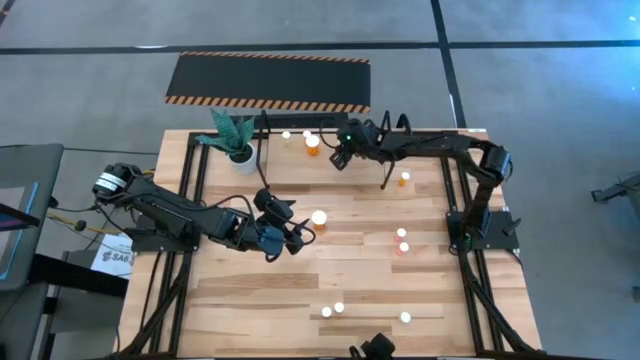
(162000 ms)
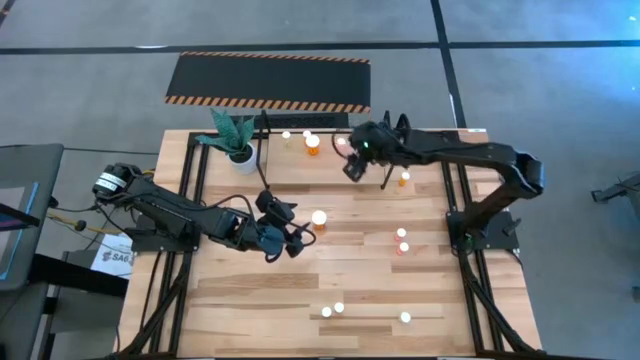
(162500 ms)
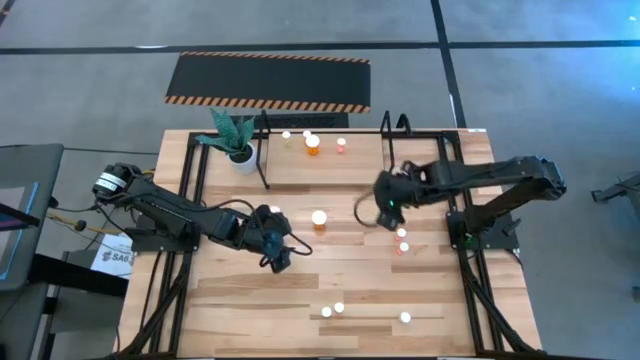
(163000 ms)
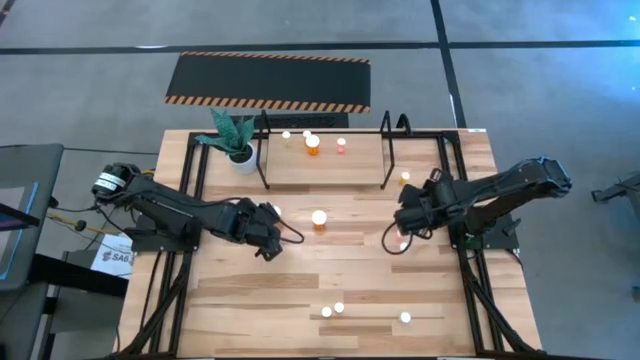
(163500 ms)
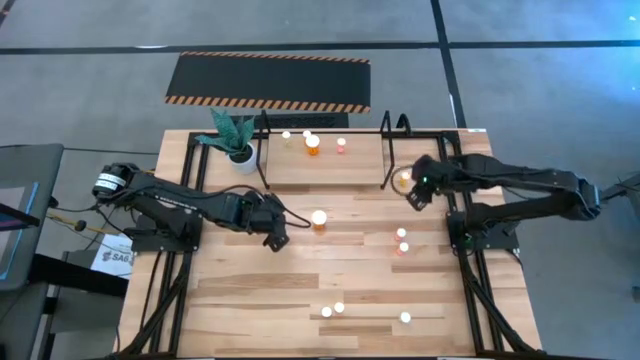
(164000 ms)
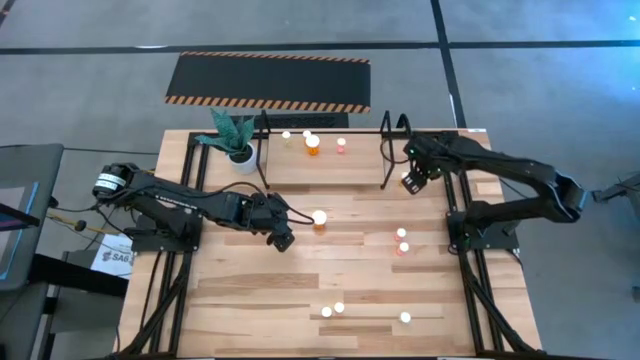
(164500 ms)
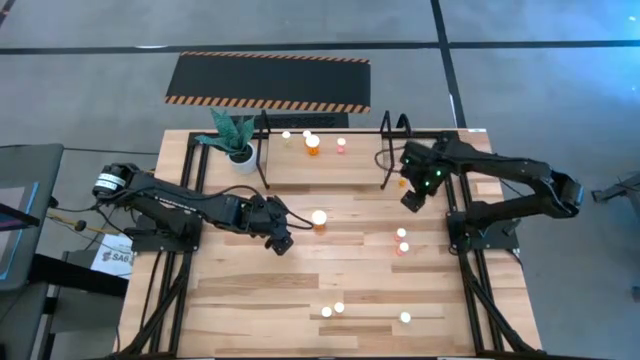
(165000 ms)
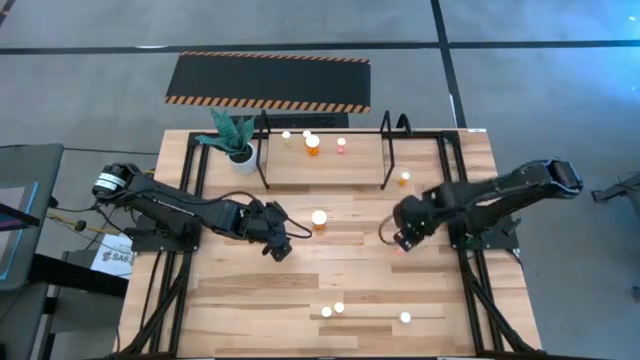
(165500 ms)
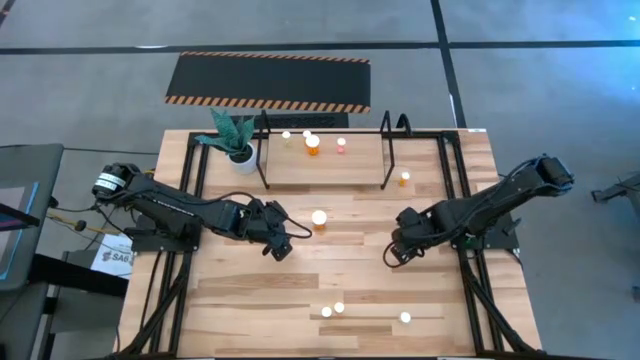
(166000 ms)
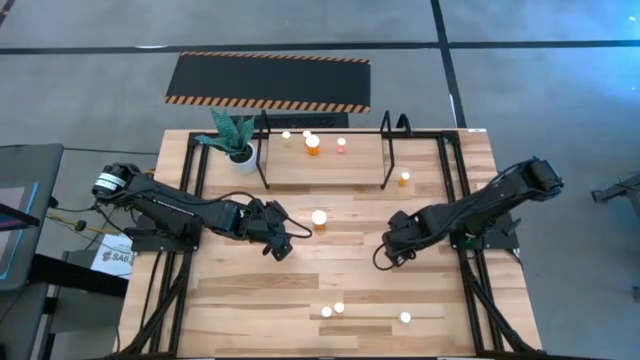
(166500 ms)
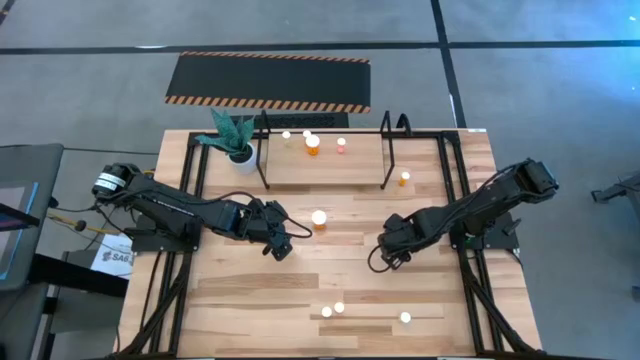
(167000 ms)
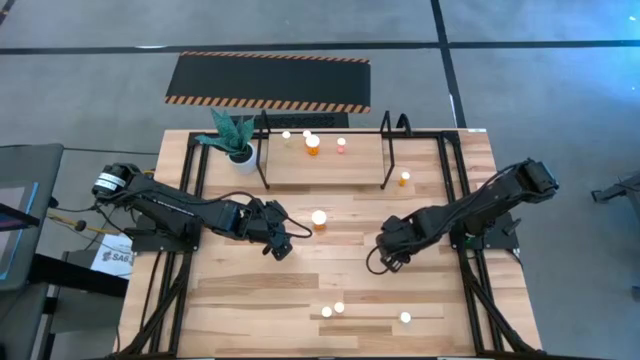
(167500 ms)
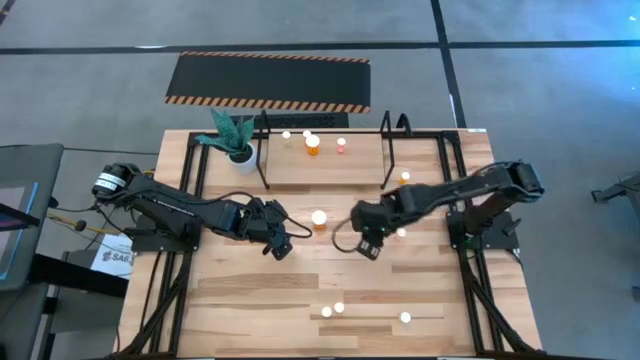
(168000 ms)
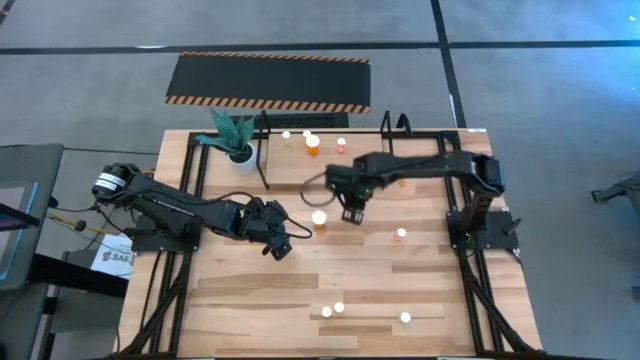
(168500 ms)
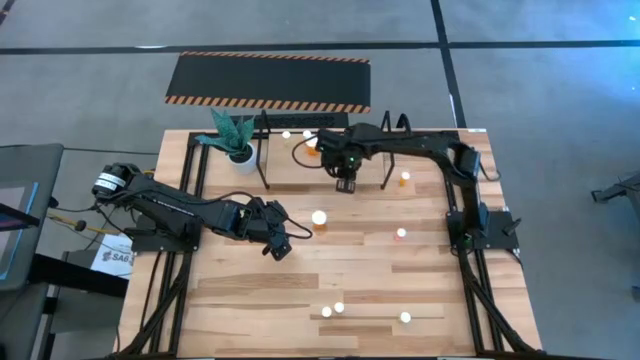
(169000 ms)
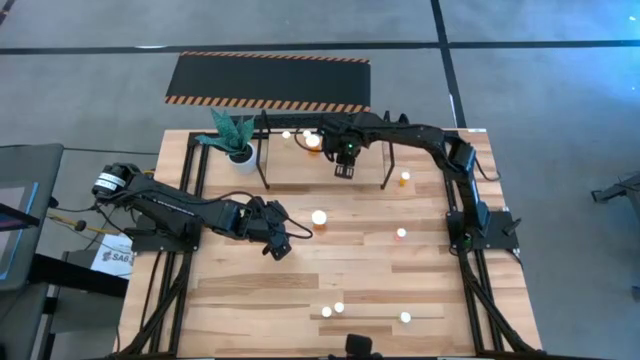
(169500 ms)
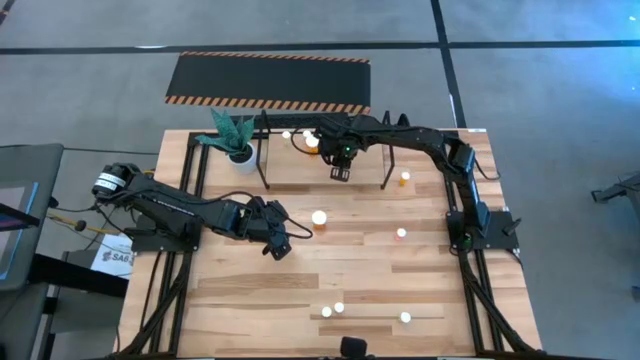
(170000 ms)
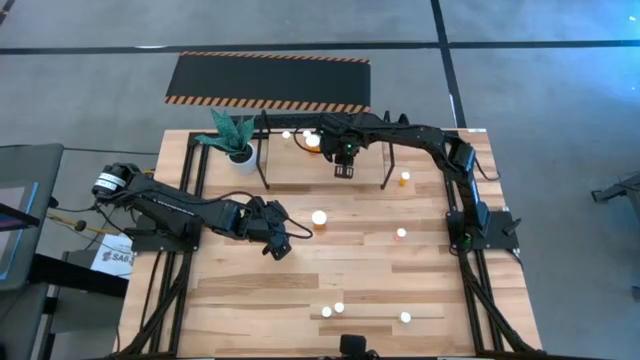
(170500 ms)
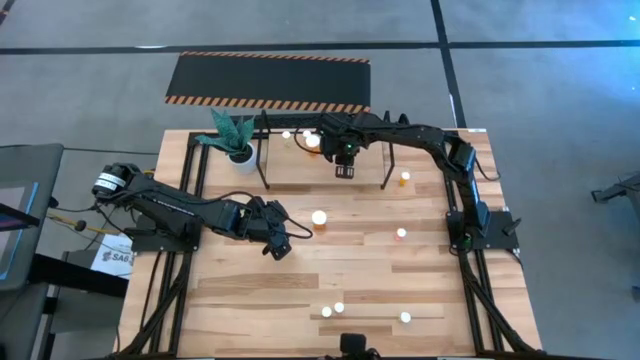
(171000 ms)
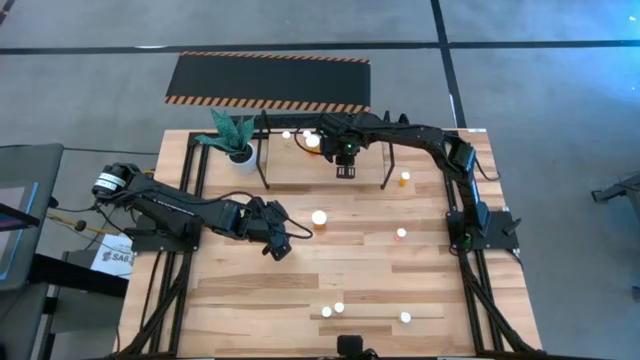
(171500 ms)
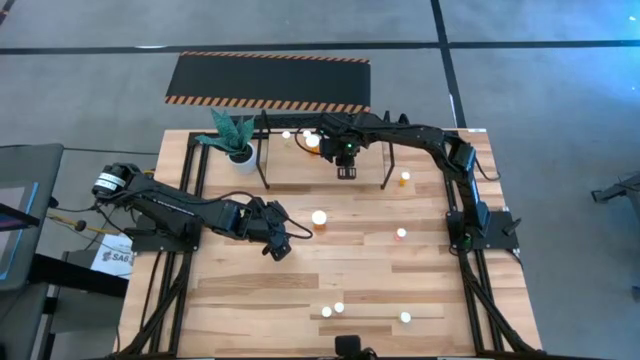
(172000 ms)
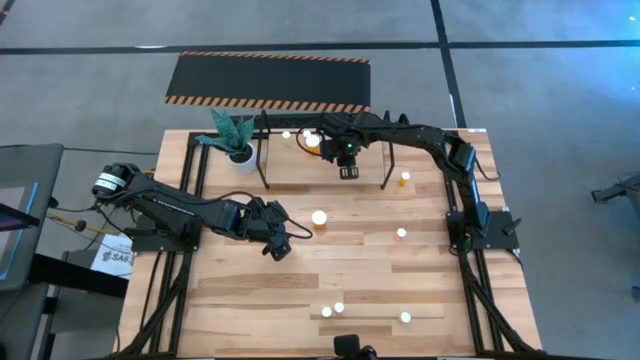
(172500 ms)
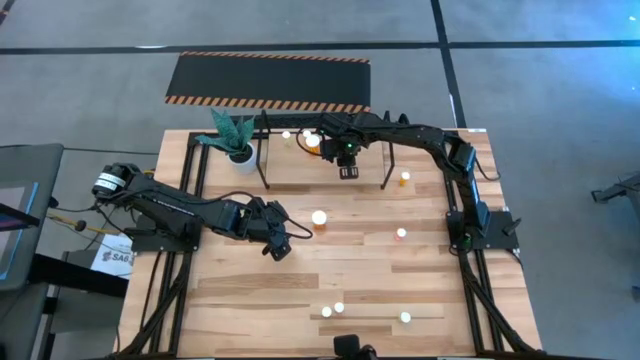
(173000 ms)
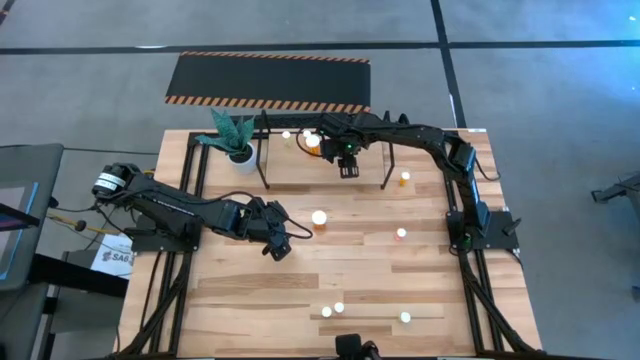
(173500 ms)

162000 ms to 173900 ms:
Task: Pick and place medicine bottles onto shelf by color
Put the bottom pink pill bottle on the shelf aligned with the other pink pill bottle

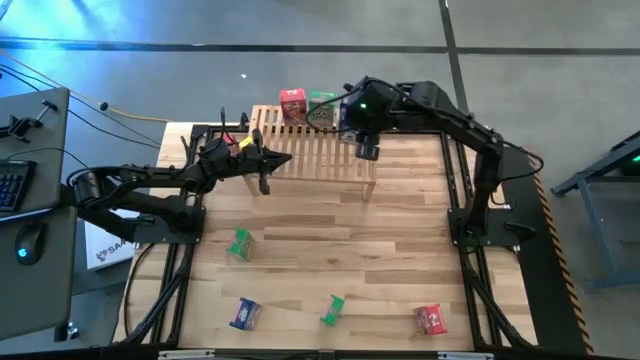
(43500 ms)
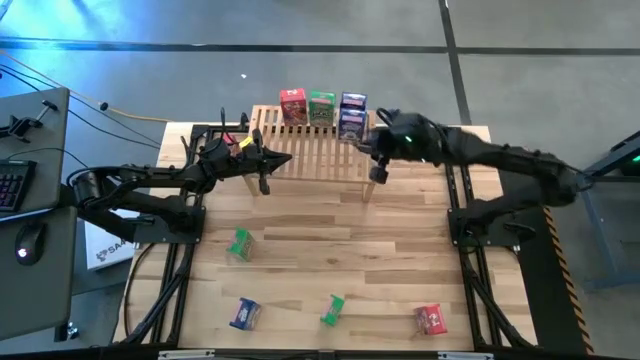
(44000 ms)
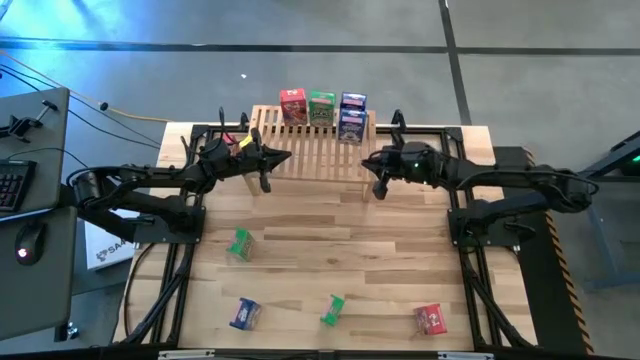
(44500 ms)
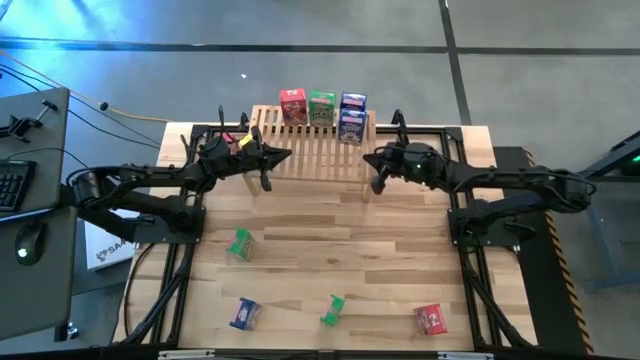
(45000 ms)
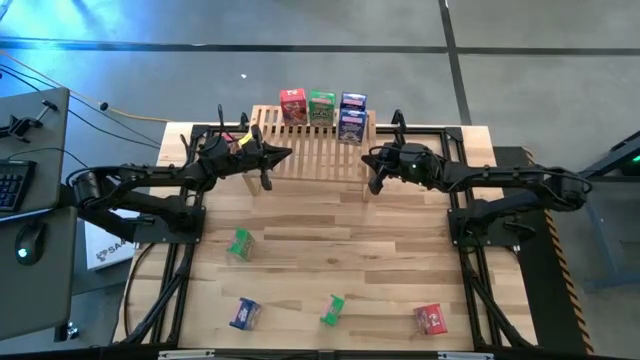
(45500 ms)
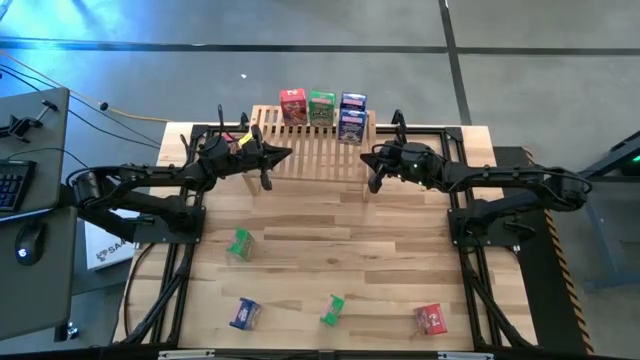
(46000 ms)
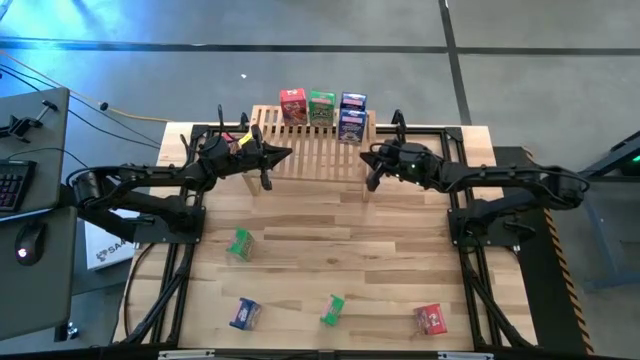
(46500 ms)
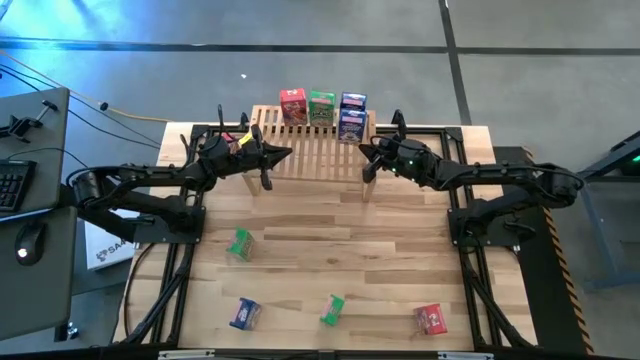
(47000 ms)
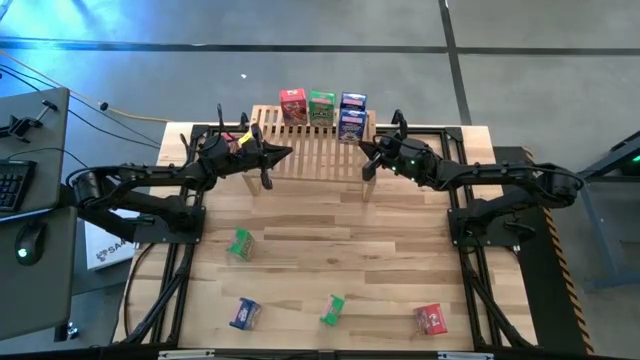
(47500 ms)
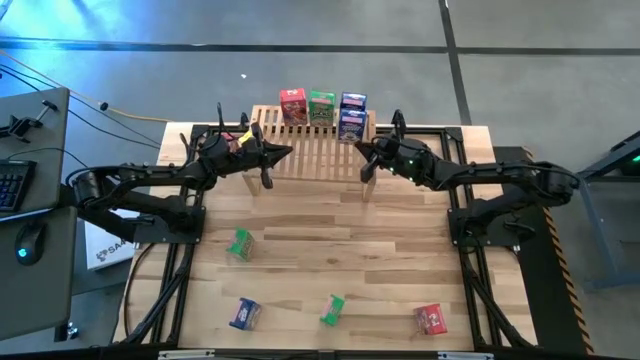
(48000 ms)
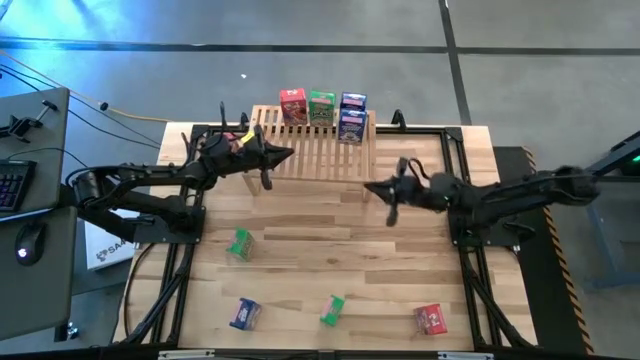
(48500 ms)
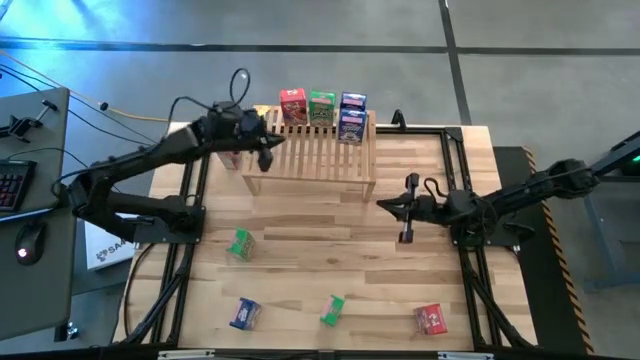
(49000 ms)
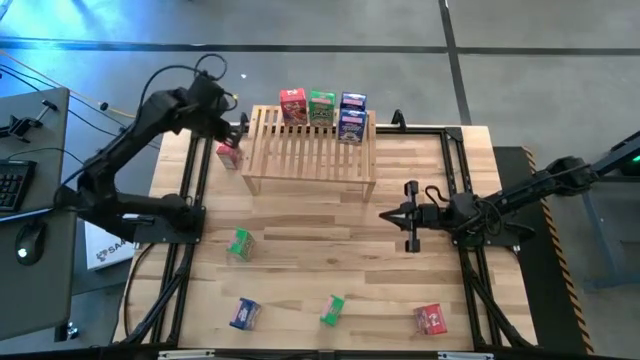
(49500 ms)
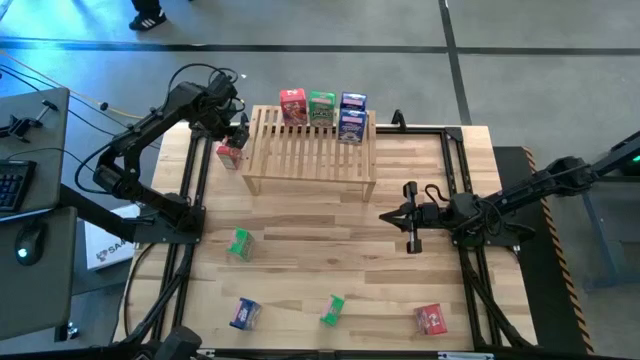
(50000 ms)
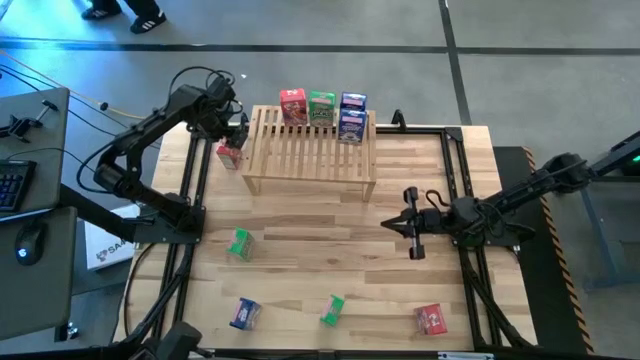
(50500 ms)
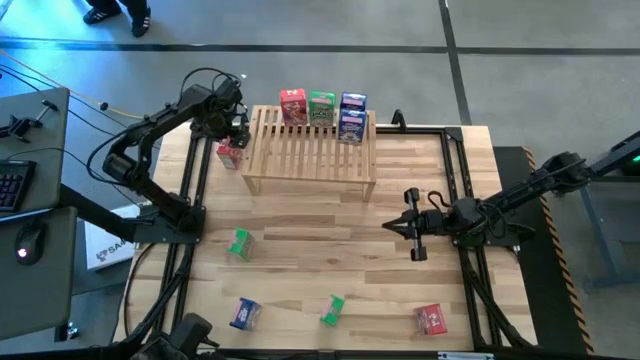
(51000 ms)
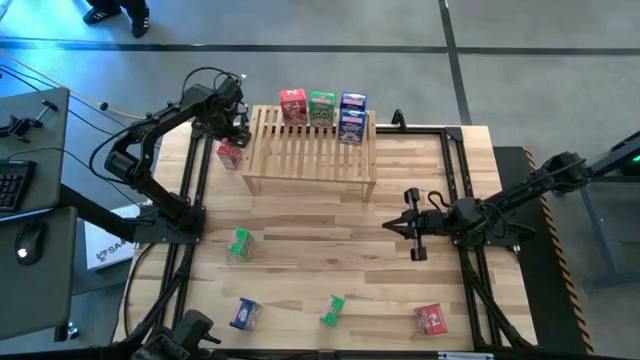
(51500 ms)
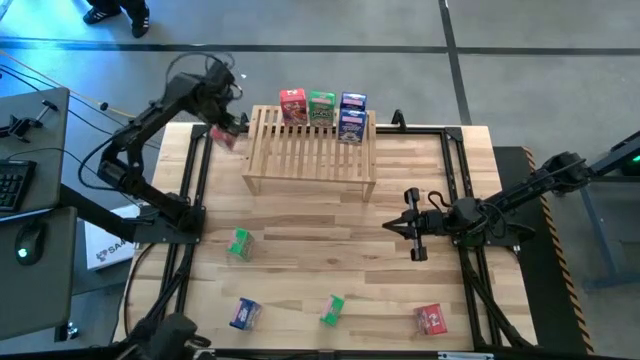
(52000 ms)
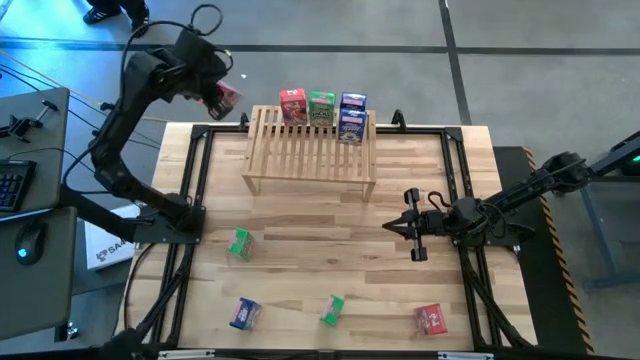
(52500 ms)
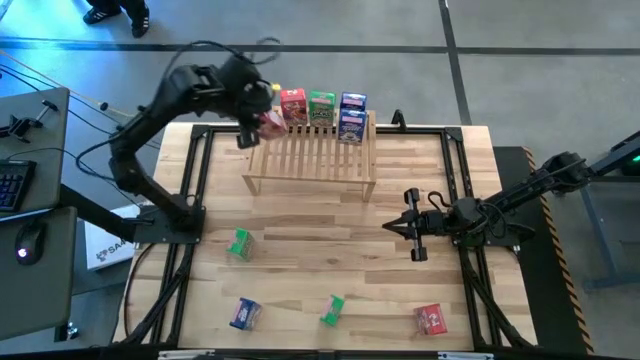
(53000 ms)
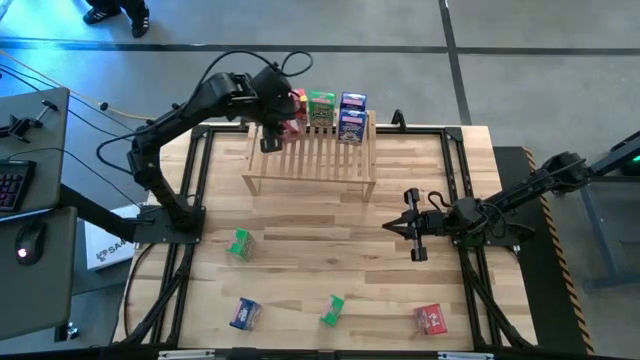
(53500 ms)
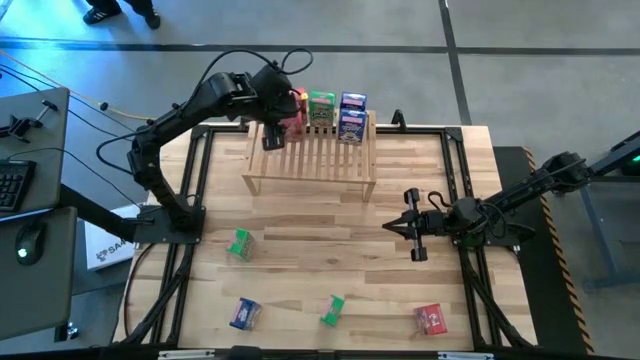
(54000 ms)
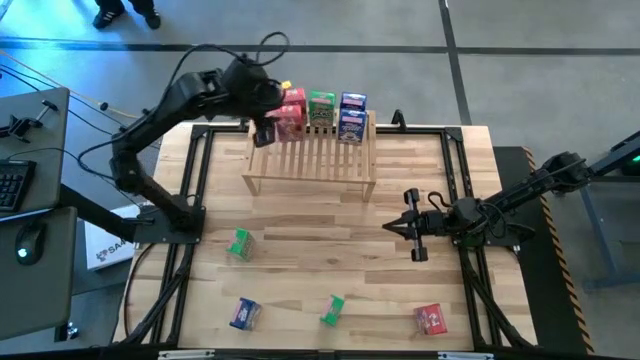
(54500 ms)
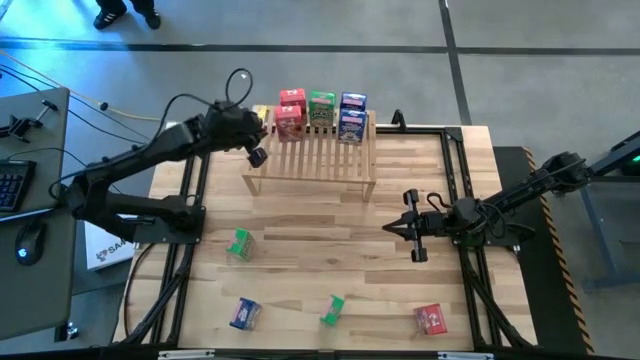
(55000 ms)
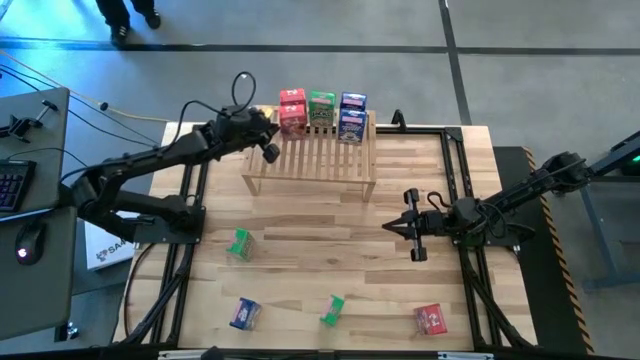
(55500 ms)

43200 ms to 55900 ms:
Task: Stack cereal on shelf
Put the top red cereal box on the shelf aligned with the other red cereal box
